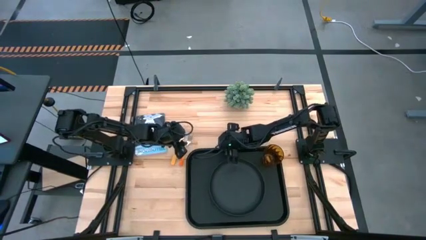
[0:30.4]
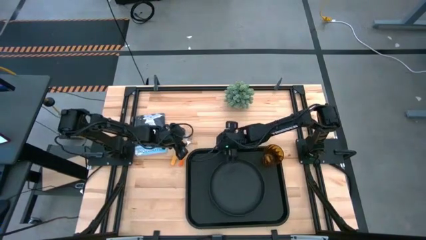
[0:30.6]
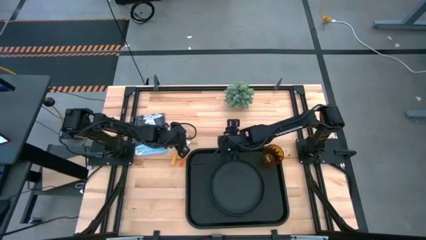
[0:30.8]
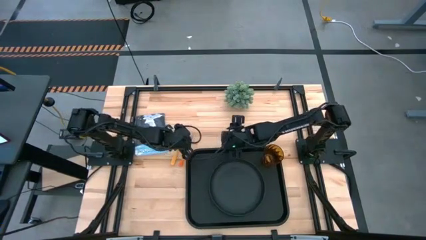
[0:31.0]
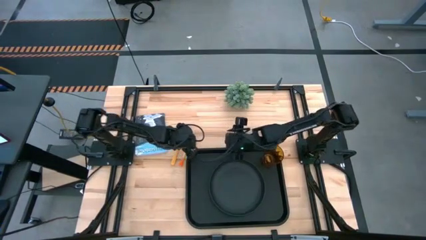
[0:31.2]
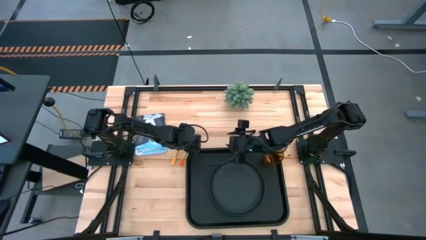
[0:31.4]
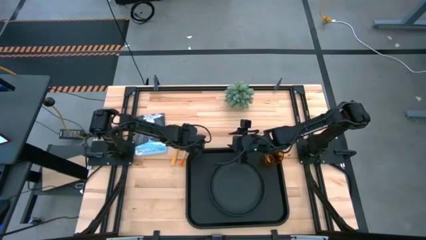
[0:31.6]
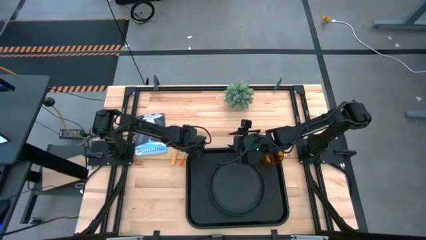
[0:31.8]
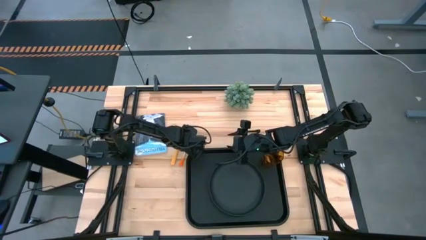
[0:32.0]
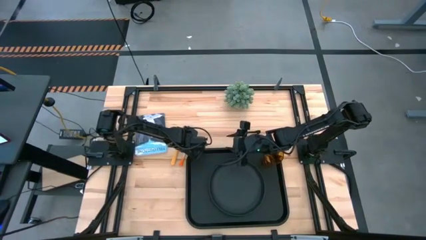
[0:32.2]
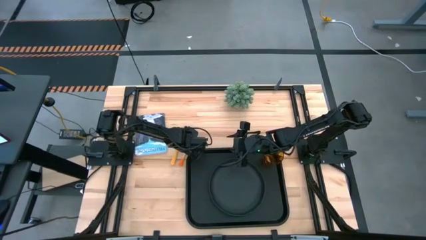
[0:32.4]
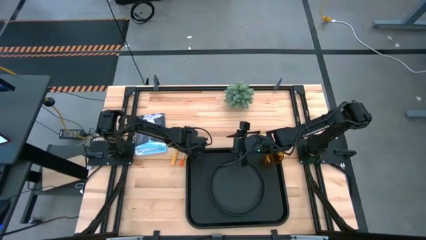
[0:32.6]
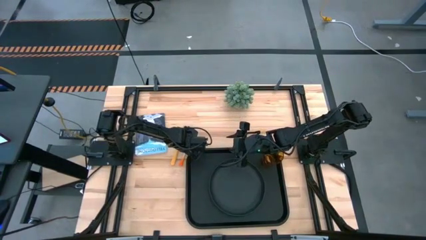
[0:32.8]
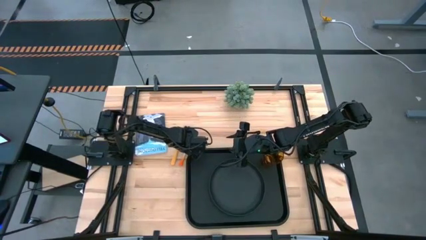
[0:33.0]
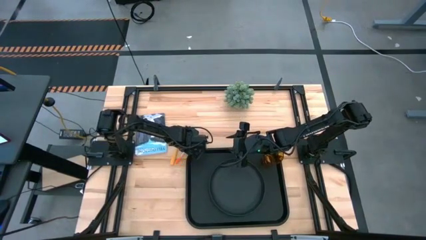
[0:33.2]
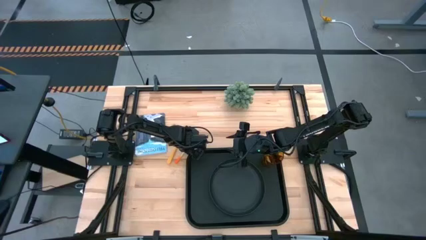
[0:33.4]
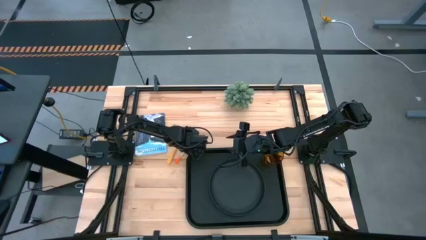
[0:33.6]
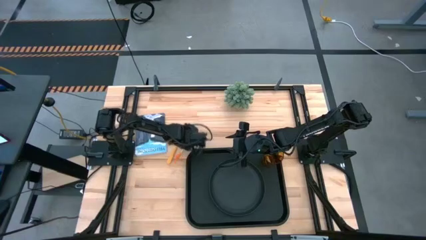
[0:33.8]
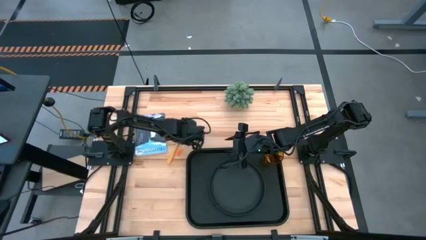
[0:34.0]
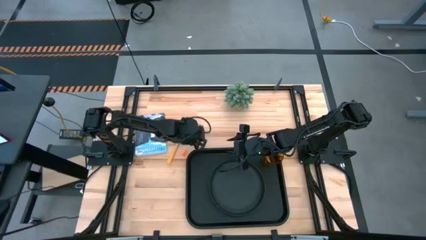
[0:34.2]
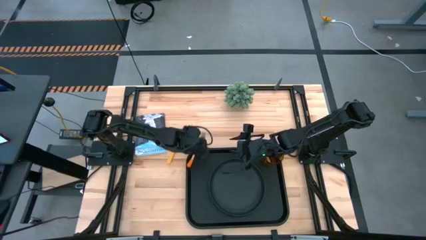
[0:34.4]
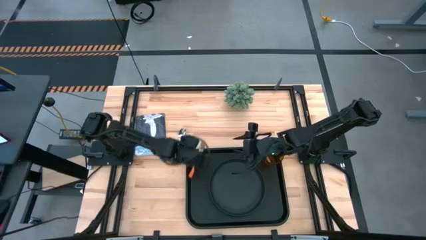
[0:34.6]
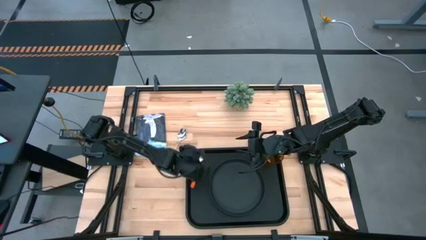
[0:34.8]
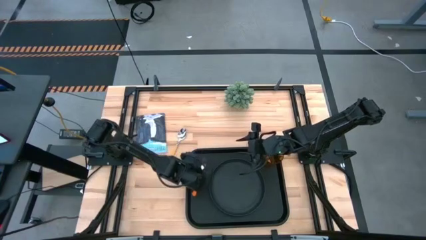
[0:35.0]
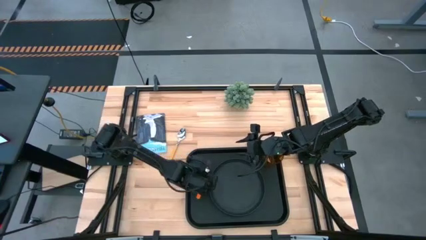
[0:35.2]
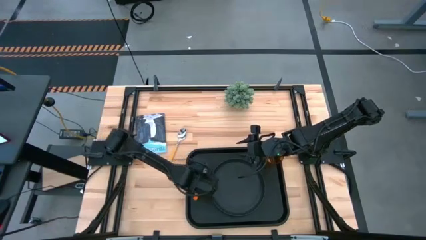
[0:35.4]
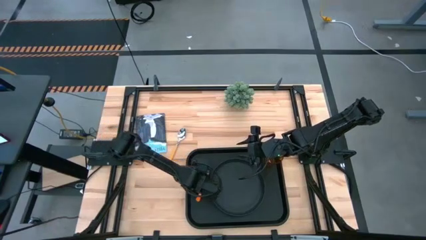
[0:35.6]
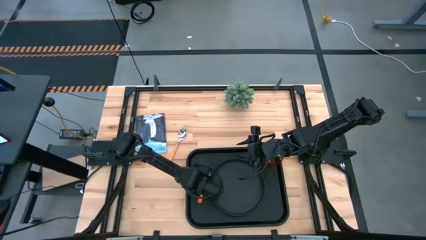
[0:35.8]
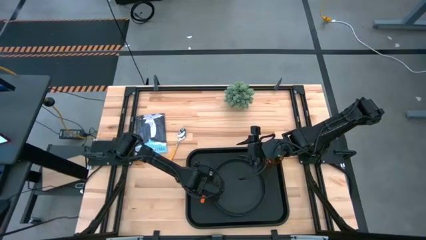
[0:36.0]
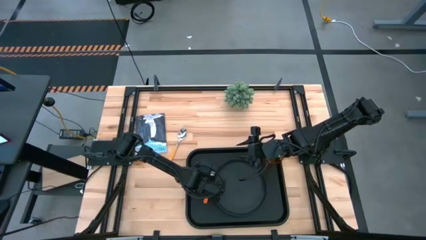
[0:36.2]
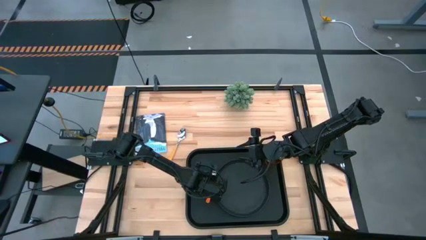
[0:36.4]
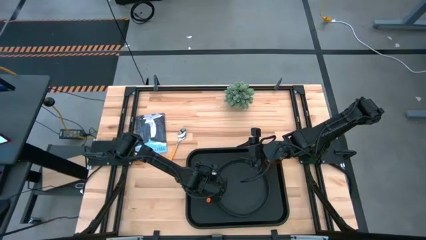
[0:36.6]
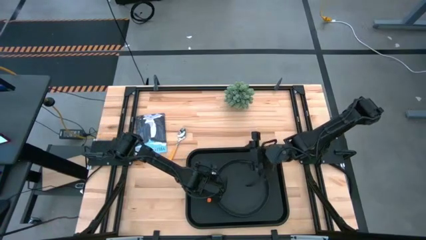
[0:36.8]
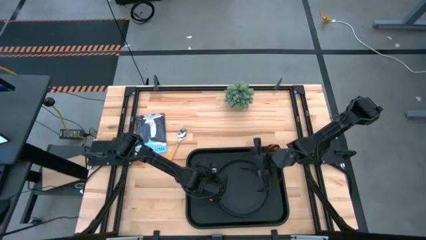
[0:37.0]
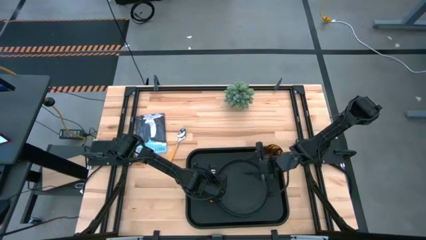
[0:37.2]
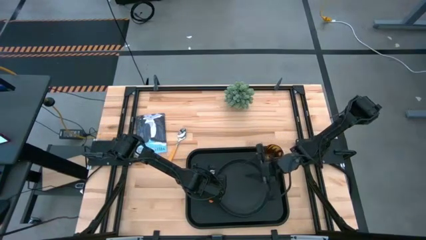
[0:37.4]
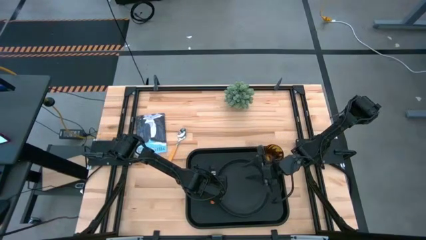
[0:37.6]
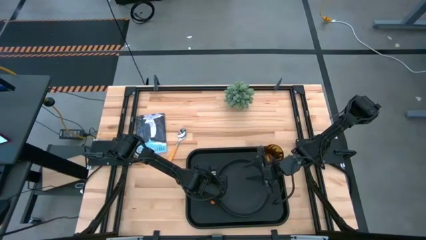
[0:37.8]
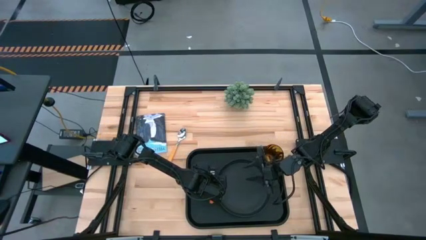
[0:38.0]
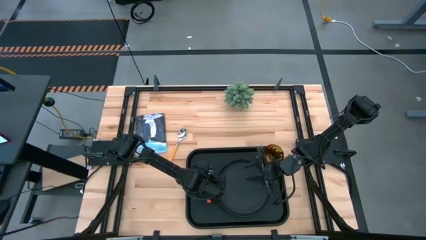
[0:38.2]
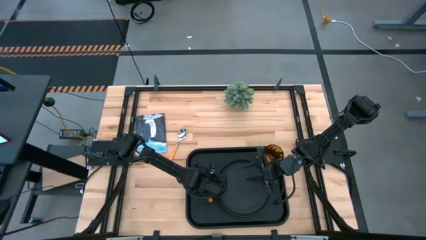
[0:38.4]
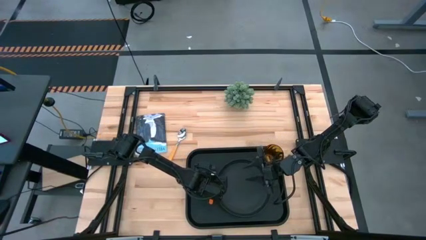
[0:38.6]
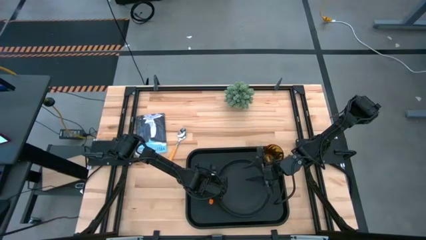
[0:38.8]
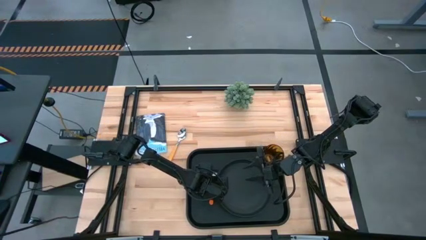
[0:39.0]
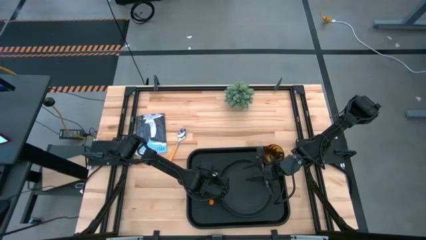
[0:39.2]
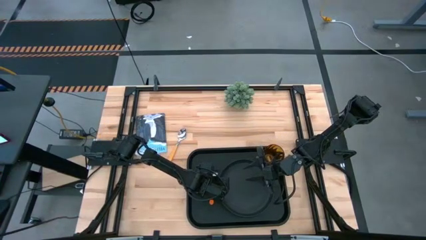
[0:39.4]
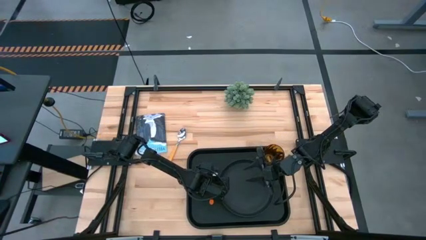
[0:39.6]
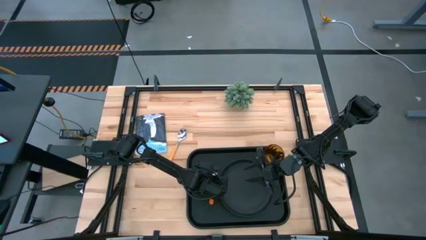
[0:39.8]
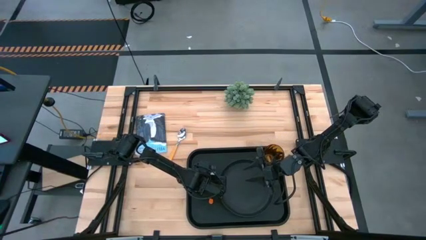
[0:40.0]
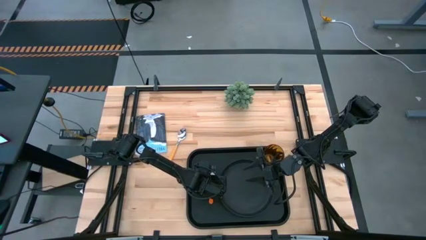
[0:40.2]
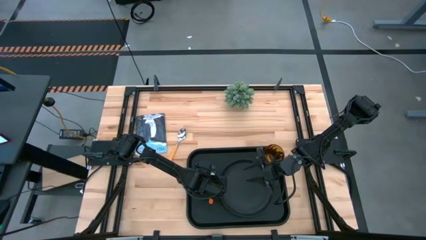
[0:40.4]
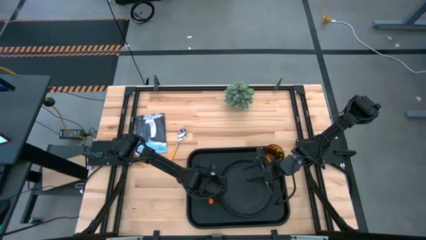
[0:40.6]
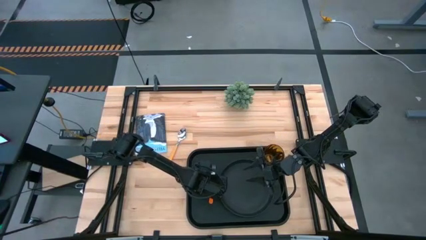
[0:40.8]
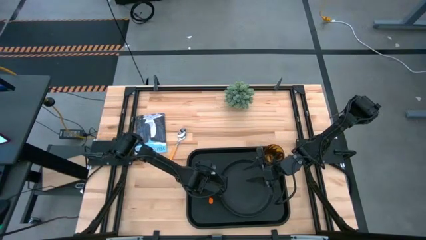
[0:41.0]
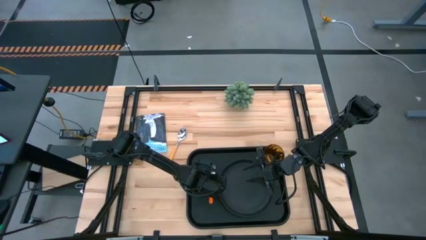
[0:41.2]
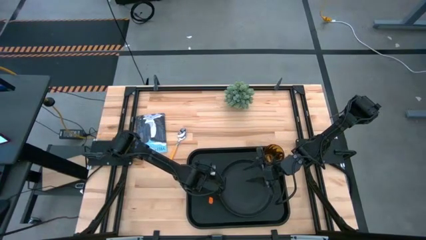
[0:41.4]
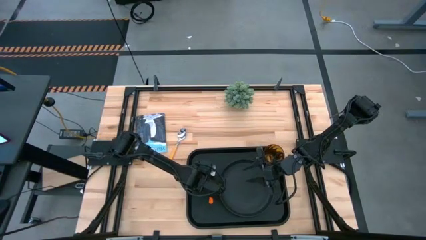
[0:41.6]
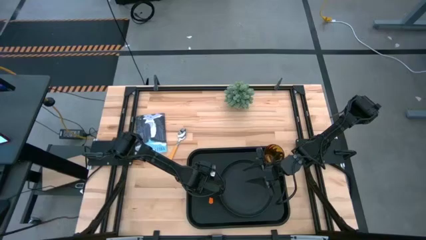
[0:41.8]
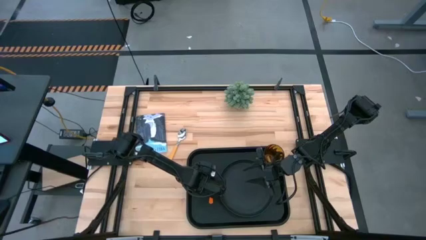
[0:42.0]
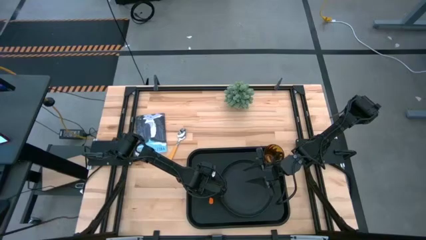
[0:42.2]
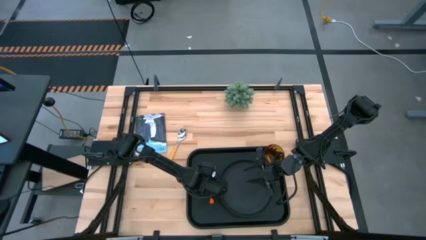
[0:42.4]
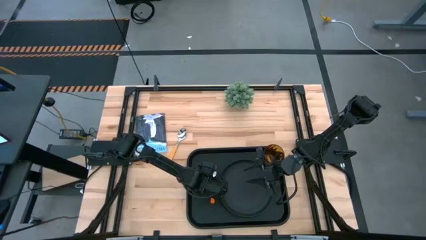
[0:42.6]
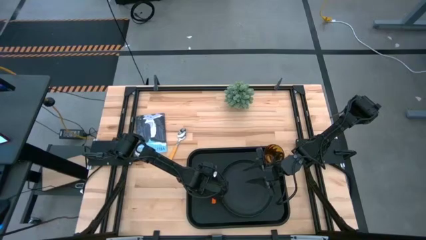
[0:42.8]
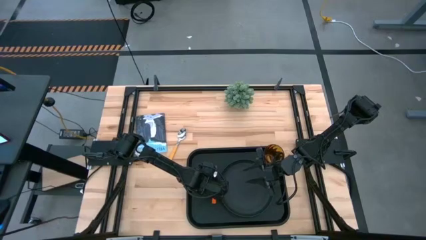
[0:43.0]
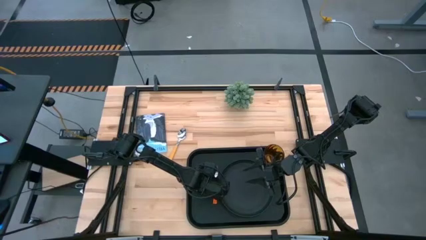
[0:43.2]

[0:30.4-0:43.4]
Task: Pick and place plate/cup/fork/spoon on tray
Put the orange fork to the left of the black plate on the black tray
